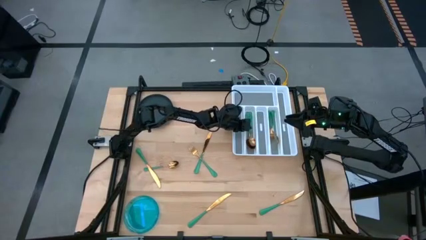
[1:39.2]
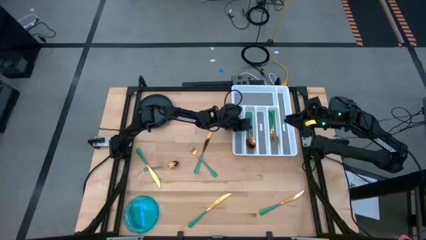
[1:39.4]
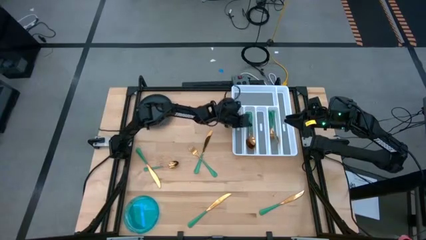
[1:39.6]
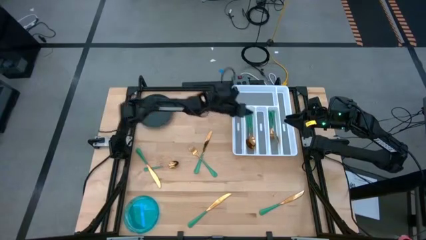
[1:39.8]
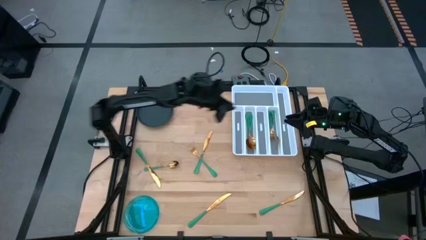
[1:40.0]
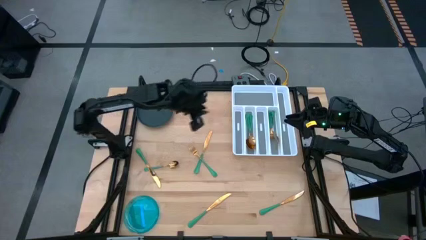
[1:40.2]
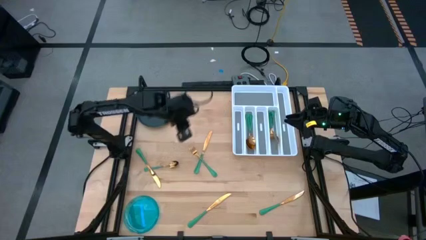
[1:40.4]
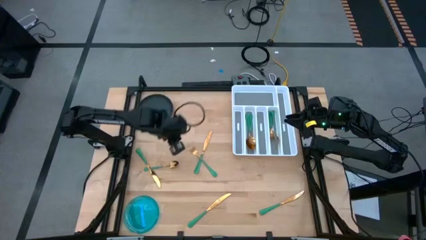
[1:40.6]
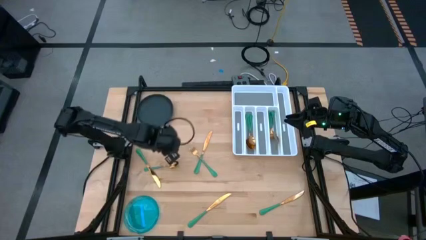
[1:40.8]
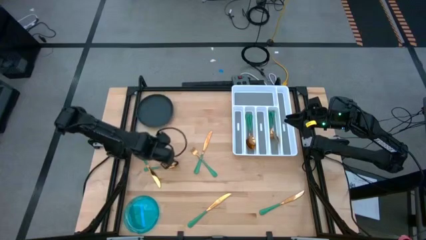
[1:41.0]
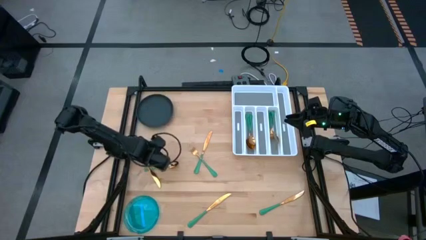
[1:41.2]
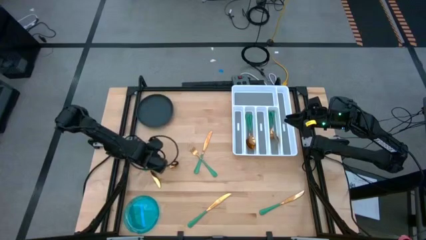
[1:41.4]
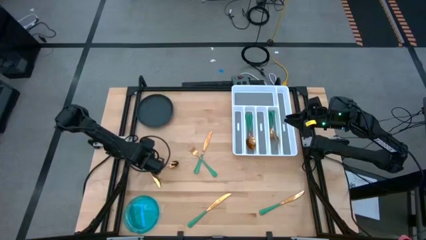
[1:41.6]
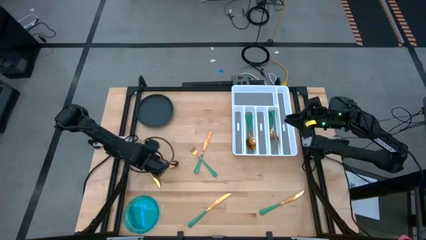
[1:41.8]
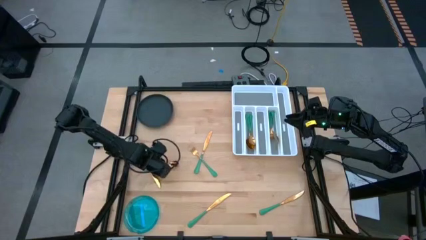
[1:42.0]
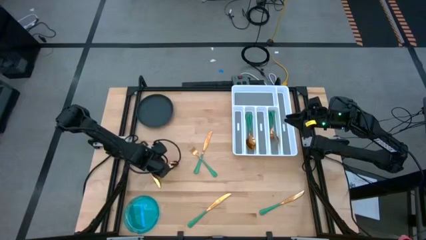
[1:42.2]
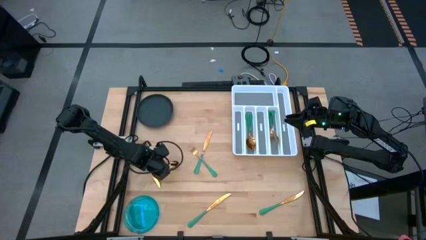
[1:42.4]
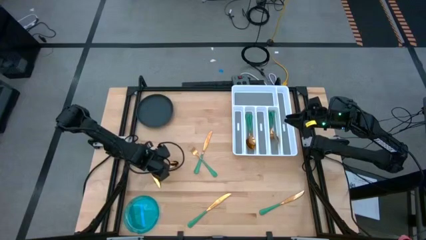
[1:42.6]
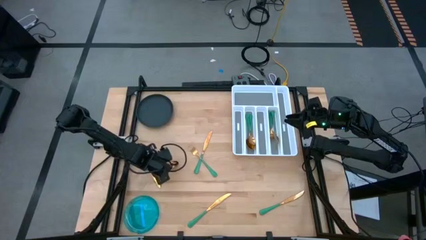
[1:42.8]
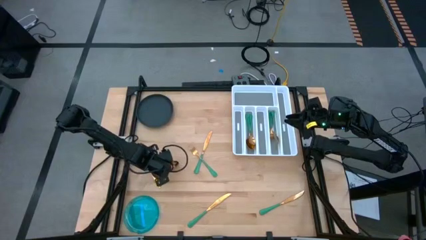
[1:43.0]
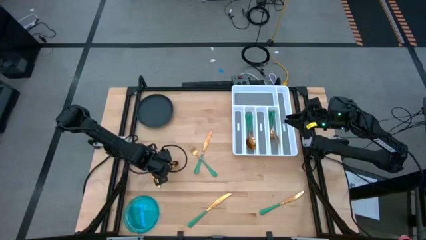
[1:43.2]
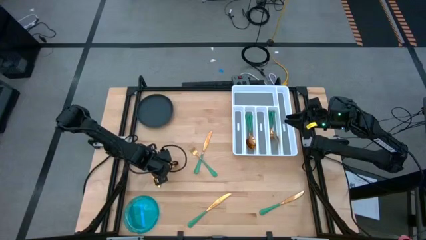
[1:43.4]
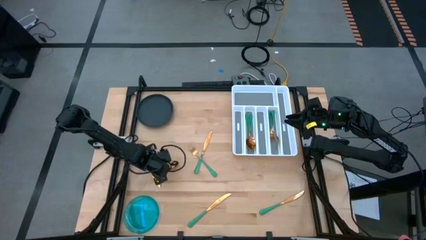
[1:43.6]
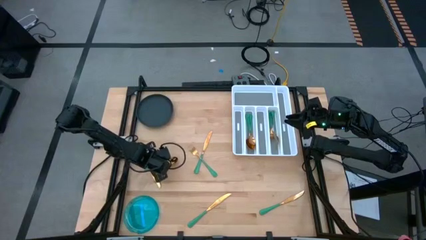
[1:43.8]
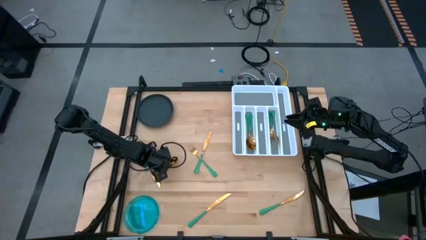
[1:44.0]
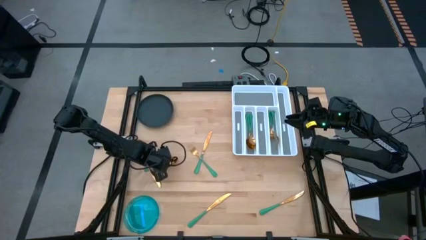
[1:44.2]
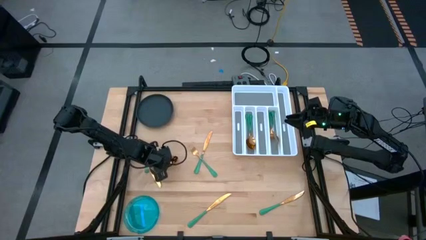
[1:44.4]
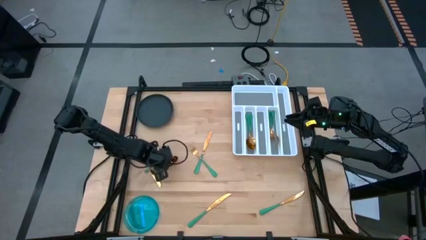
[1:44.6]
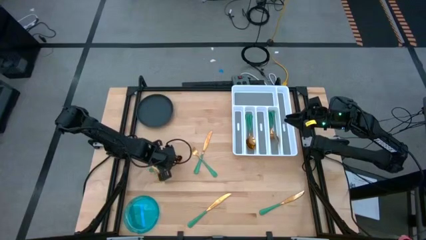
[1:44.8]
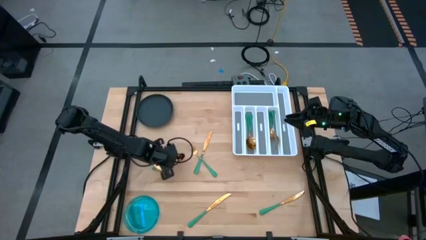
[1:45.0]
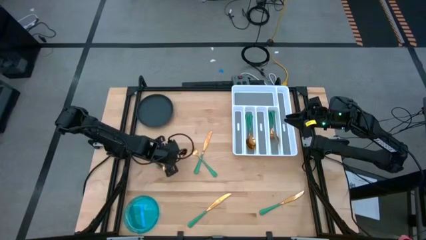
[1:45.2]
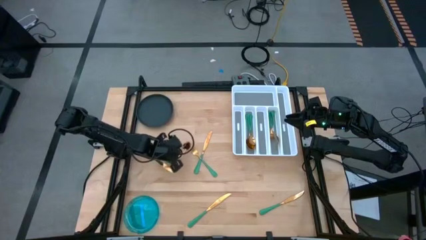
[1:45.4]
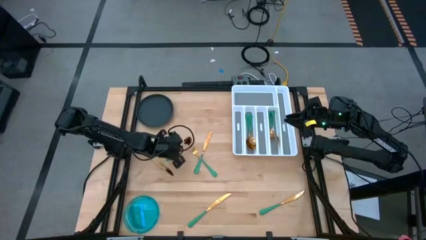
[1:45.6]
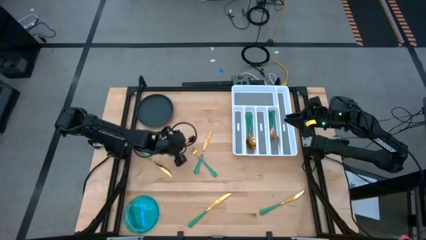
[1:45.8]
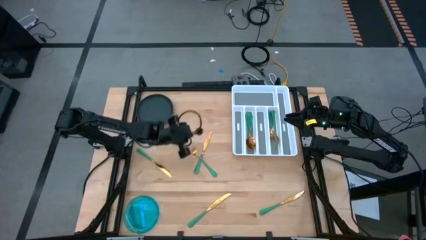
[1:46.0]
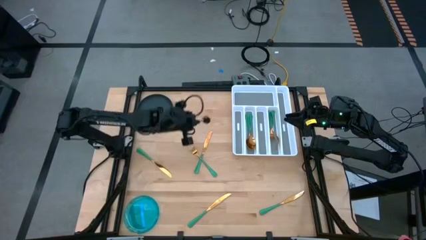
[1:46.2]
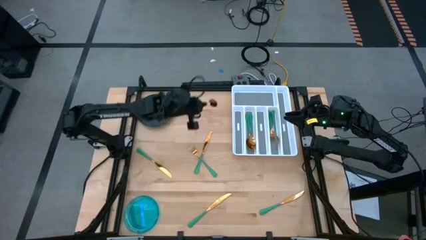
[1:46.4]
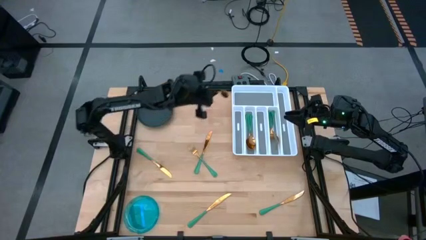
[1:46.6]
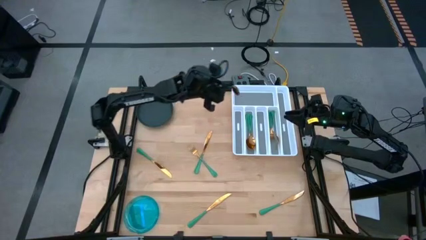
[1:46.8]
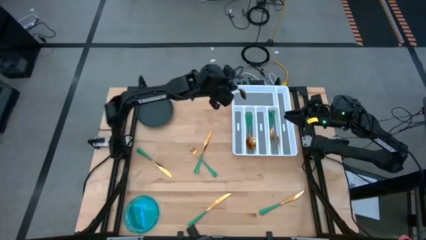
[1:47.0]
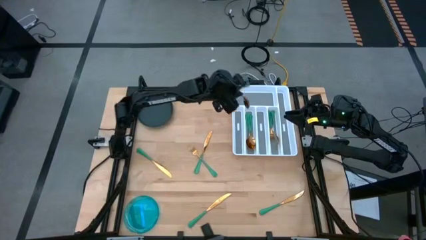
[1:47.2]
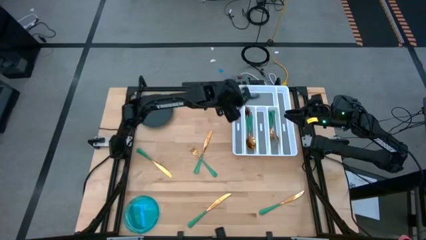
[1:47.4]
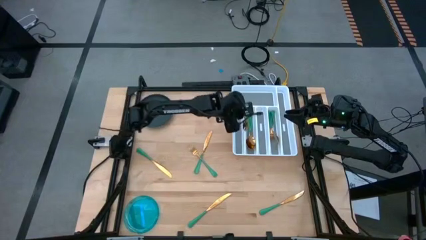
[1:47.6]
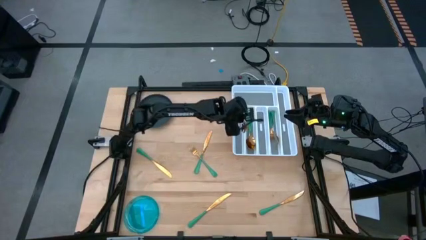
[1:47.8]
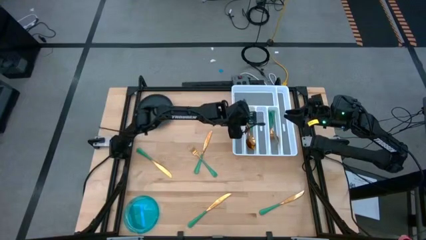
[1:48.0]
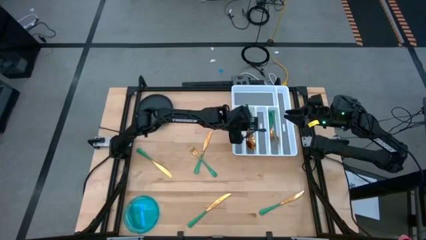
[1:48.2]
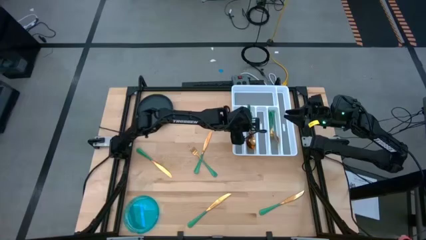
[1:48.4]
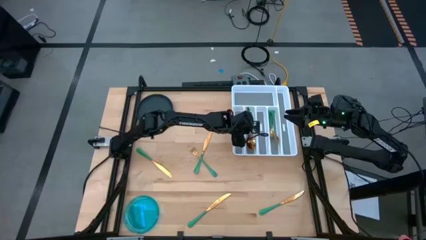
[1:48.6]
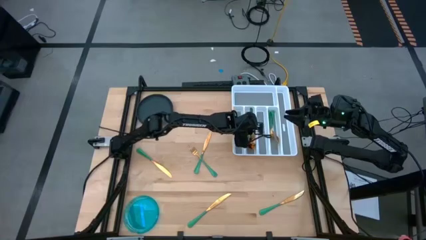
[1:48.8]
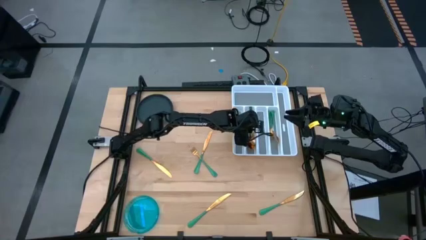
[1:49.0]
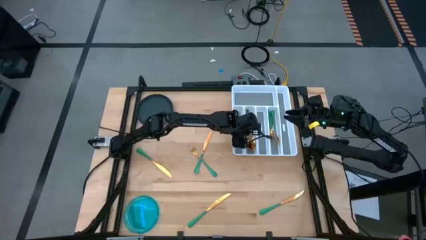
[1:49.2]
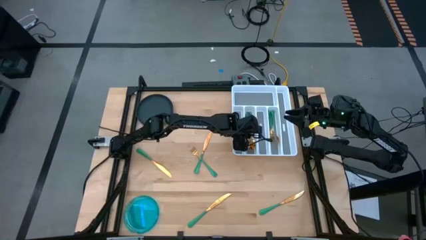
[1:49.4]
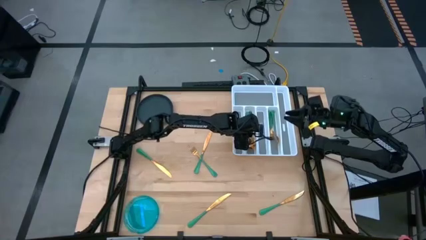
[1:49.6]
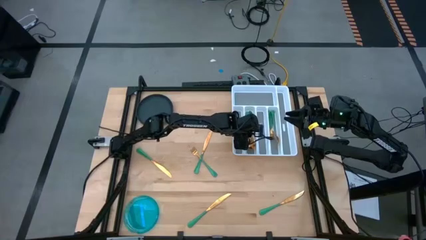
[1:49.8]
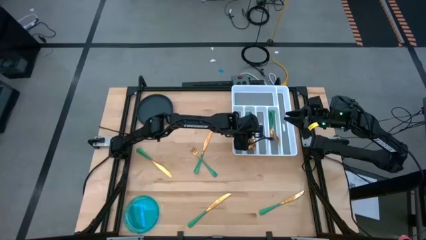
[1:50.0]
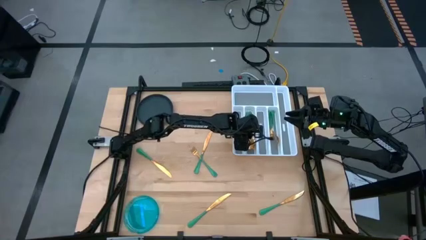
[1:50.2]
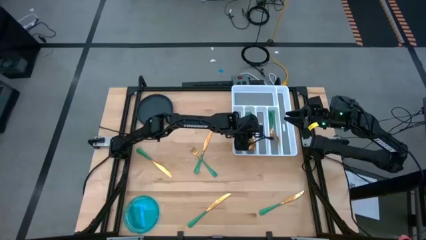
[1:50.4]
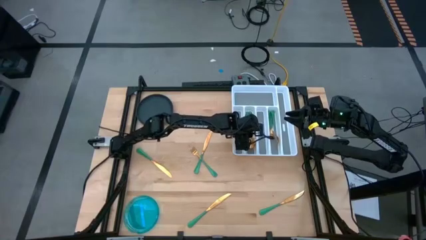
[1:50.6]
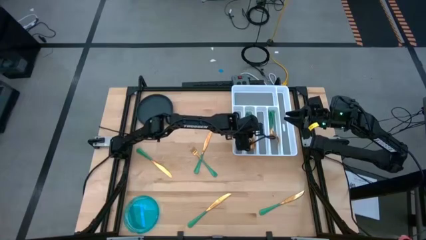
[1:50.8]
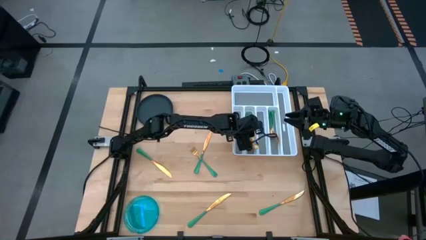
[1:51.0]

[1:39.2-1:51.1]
Task: Sort silverware
Put the green spoon into the silverware tray
